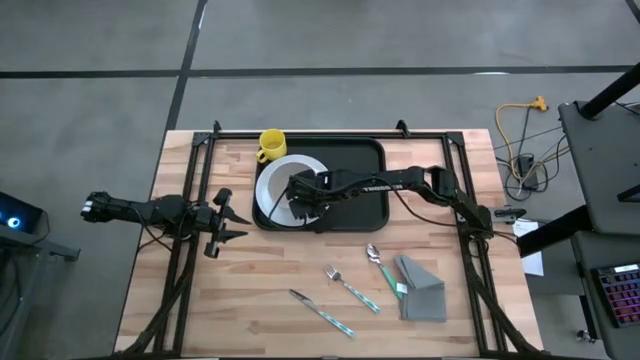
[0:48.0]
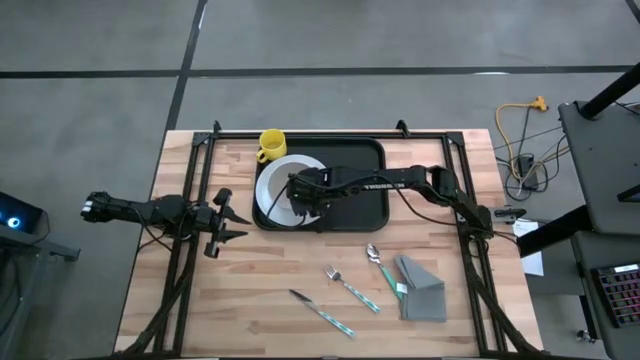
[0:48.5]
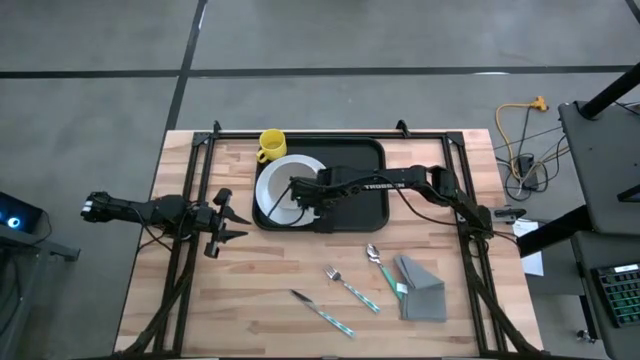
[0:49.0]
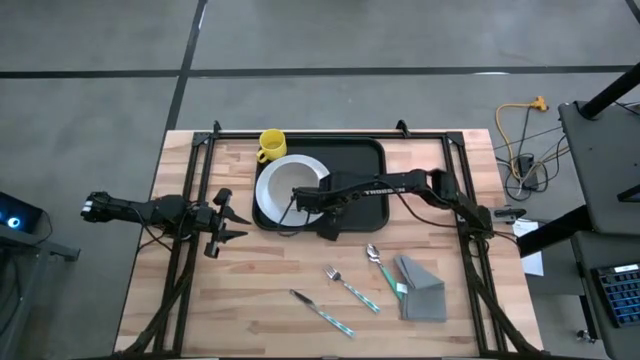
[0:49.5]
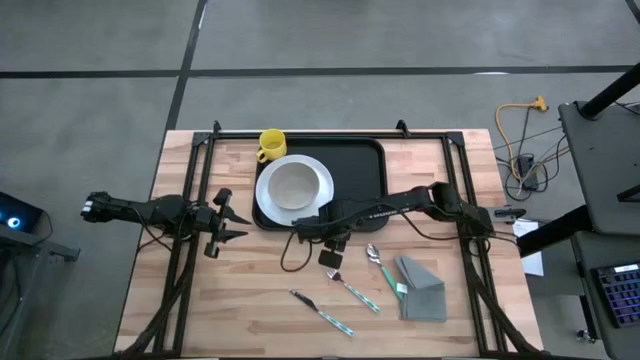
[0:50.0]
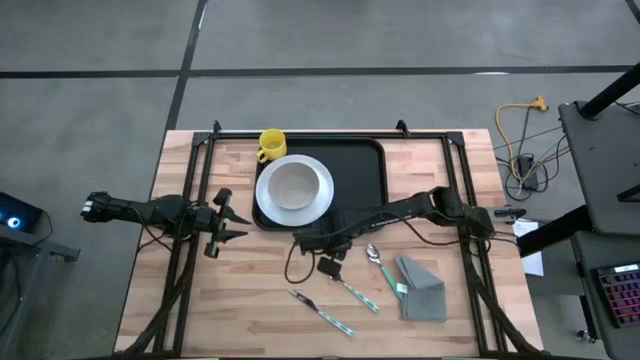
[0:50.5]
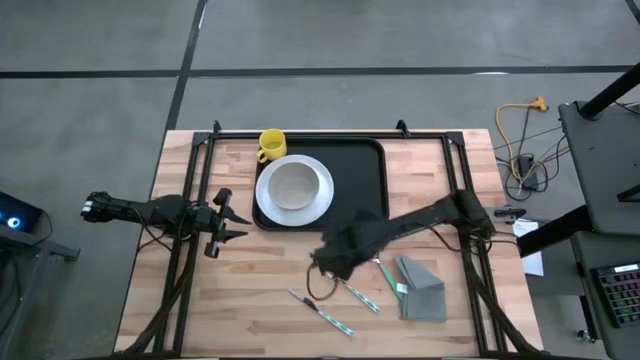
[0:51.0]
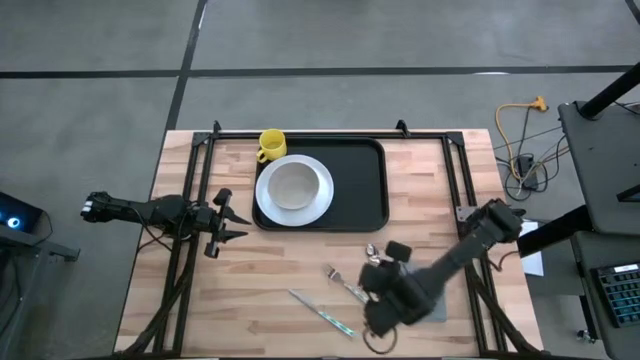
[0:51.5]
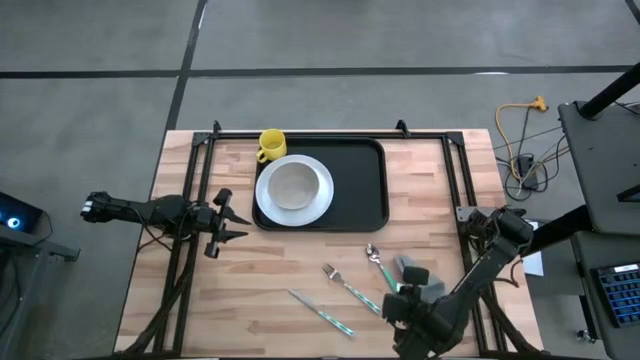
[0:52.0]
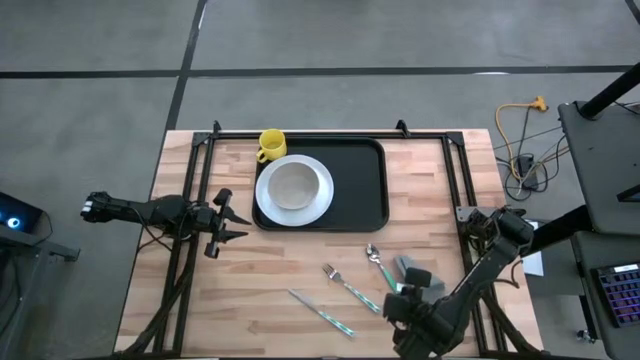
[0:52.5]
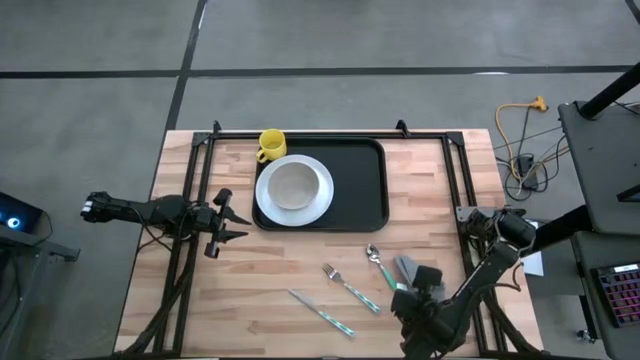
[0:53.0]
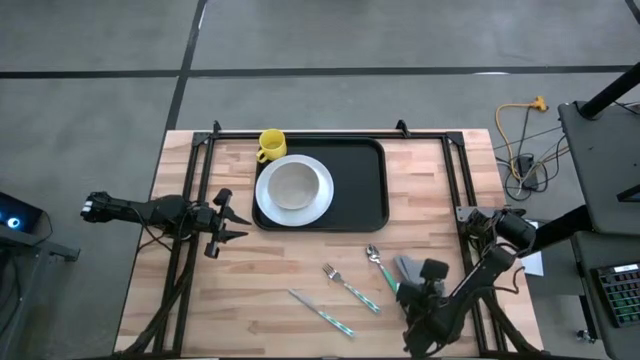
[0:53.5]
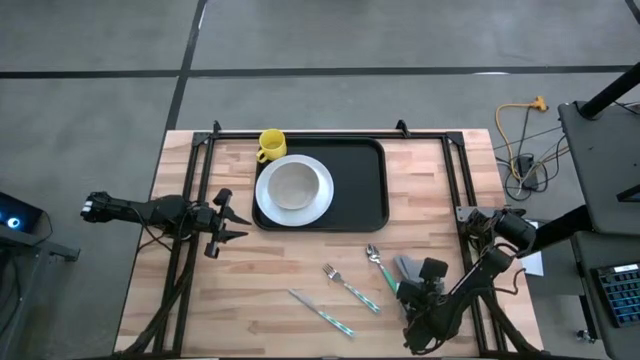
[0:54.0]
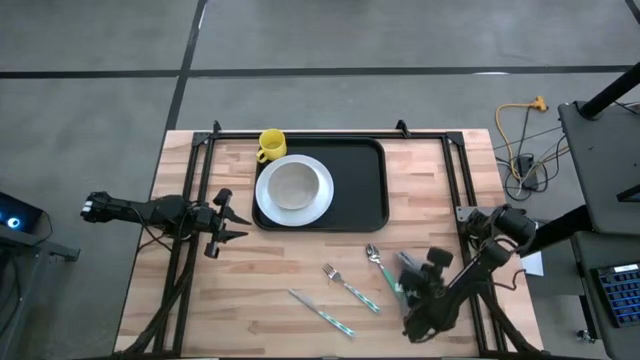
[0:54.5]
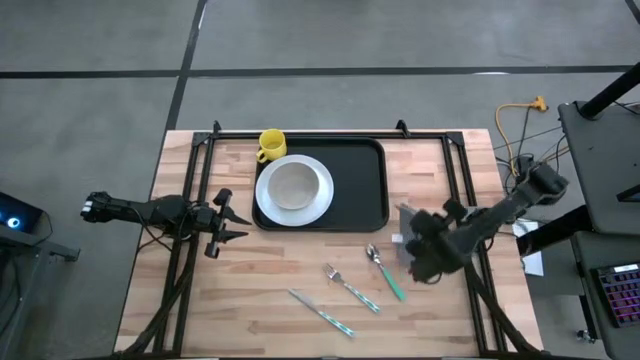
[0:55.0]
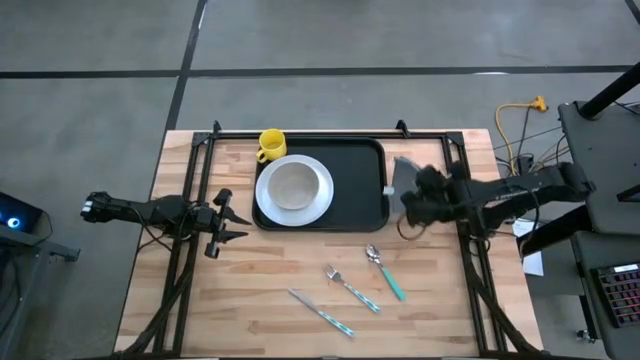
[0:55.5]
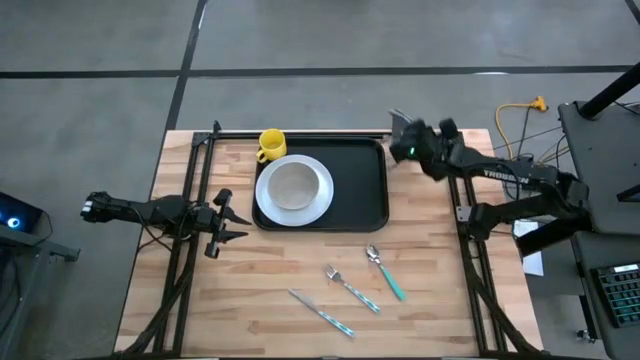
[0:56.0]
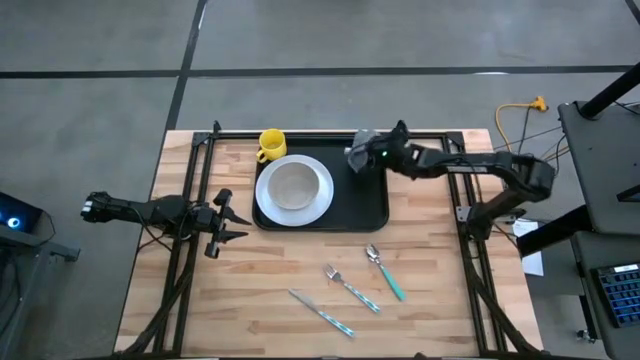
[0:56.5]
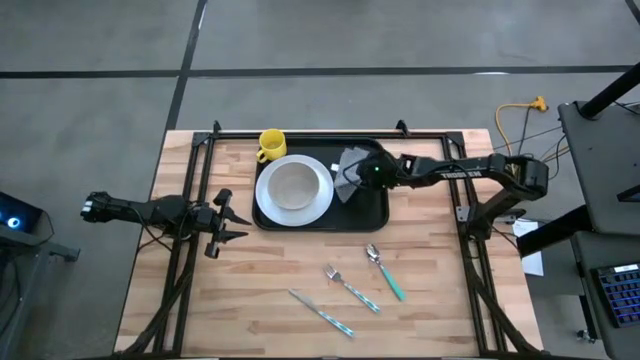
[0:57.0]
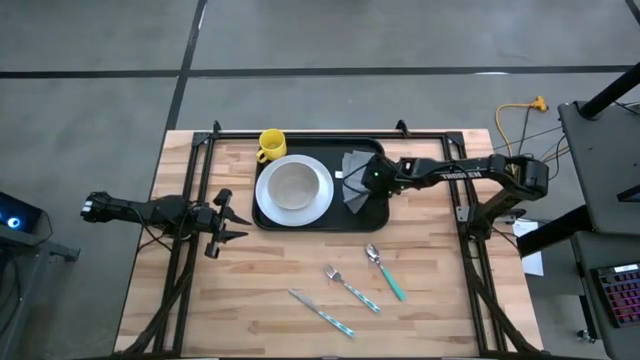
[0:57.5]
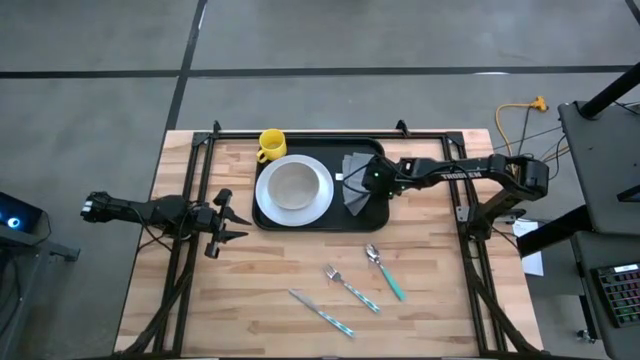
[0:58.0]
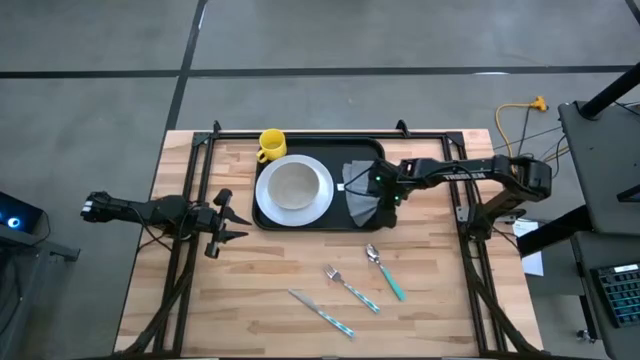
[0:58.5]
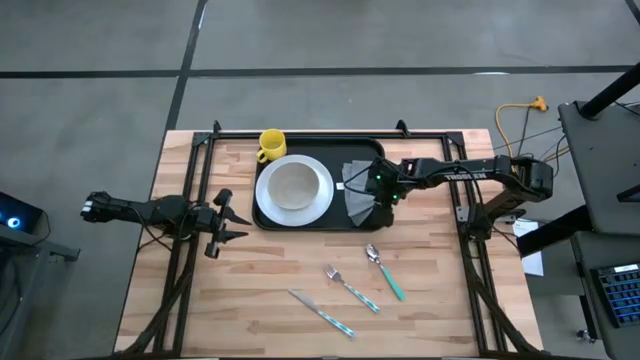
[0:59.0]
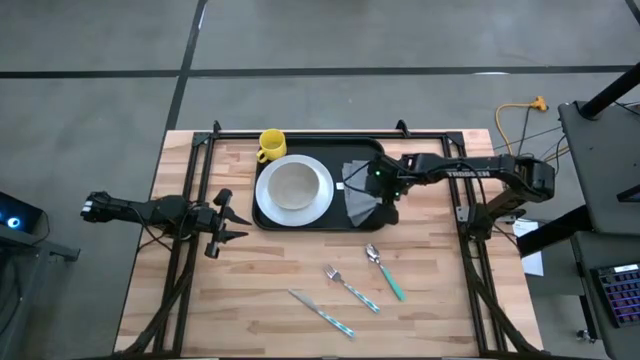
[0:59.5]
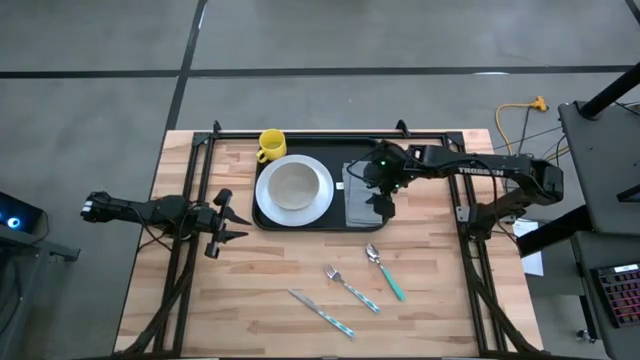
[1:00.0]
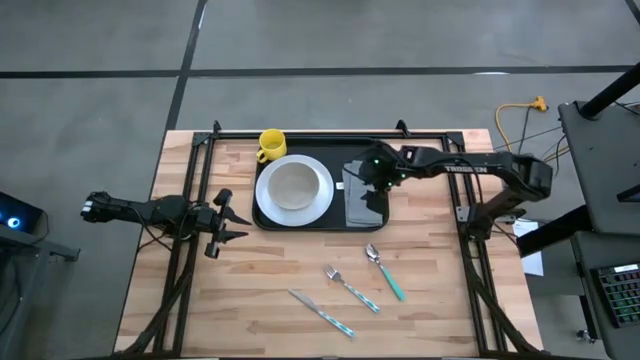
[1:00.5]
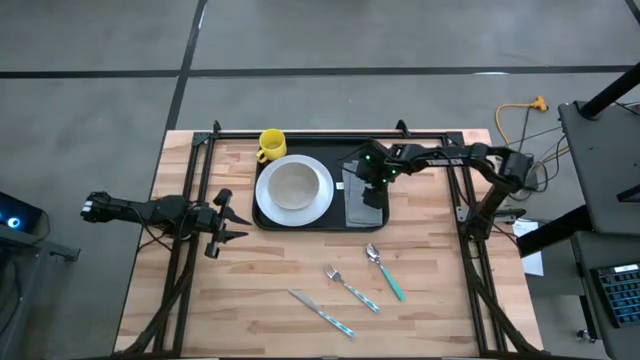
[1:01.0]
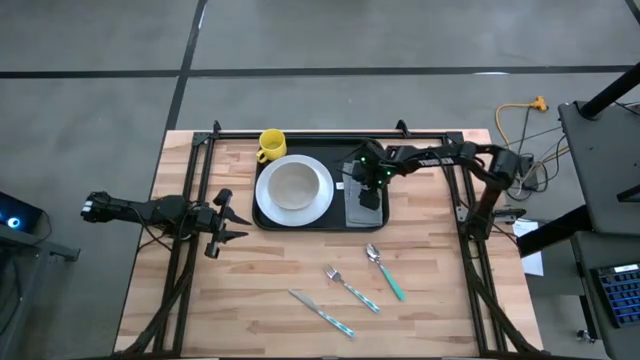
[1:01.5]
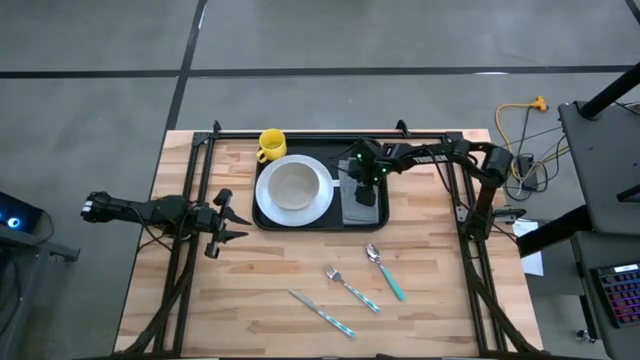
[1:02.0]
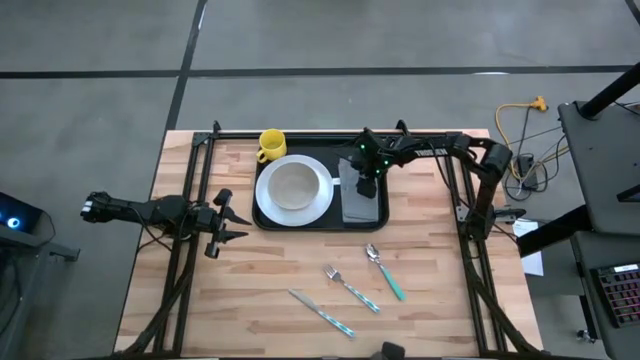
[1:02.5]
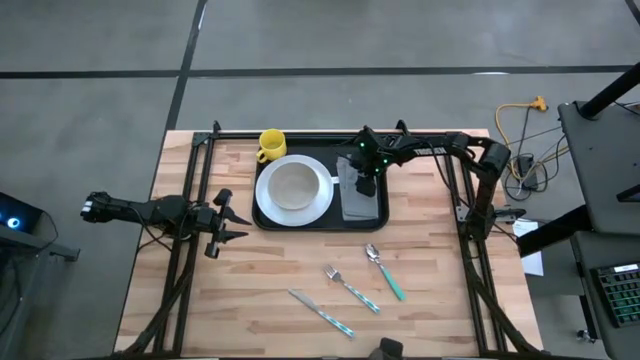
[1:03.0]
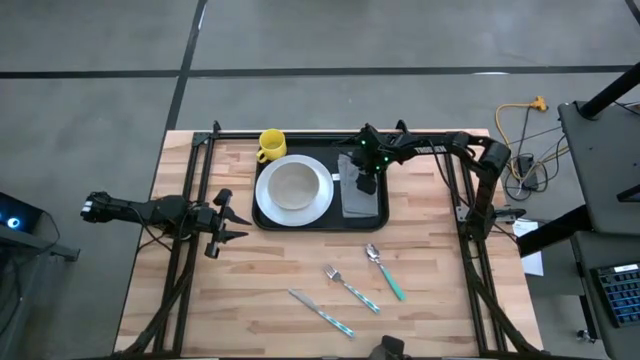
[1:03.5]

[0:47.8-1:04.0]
Task: Set up tray
Put the gray napkin on the black serving tray beside the white plate

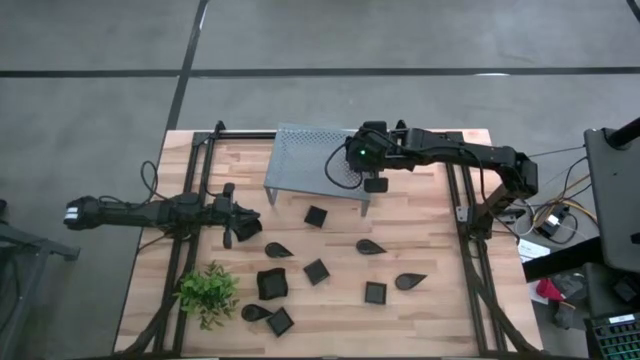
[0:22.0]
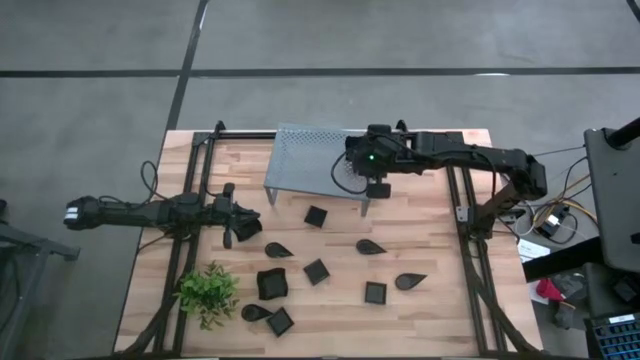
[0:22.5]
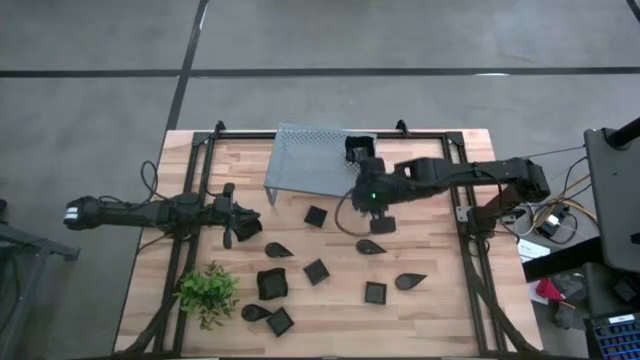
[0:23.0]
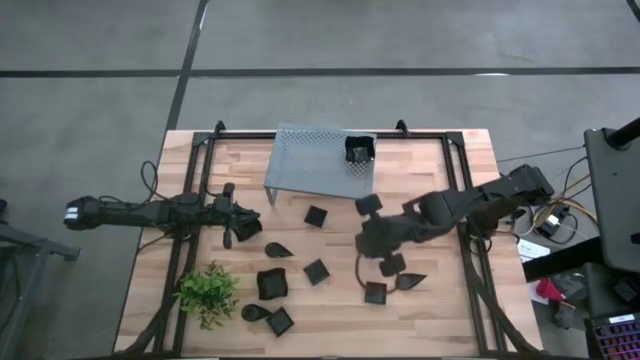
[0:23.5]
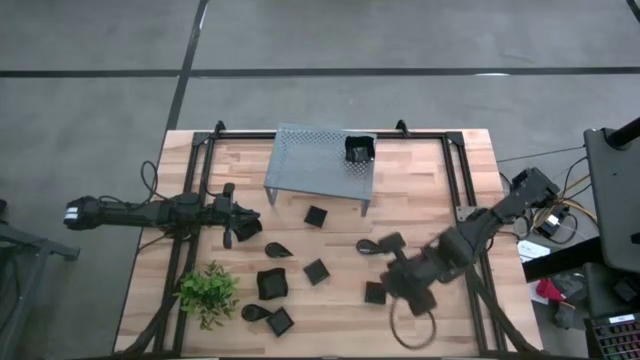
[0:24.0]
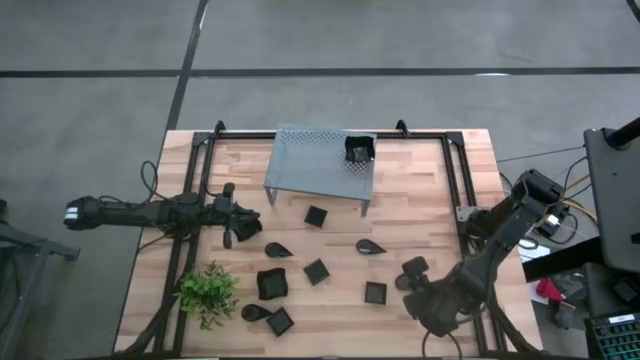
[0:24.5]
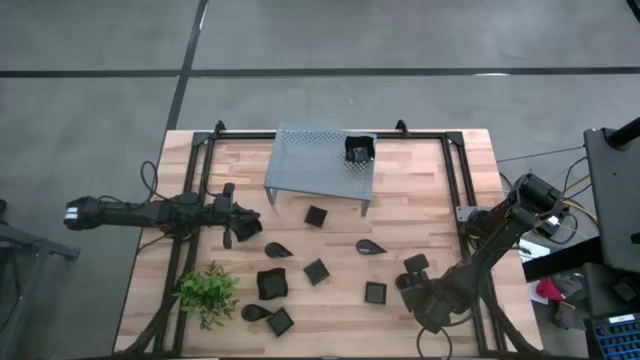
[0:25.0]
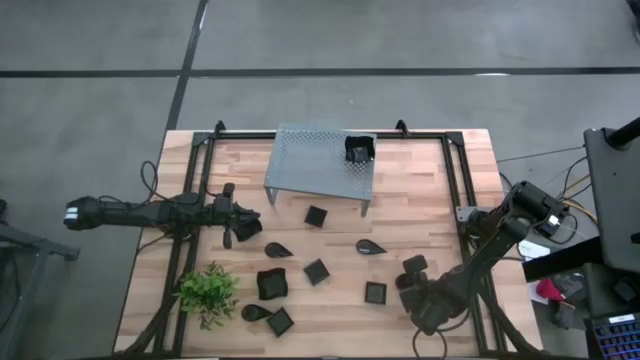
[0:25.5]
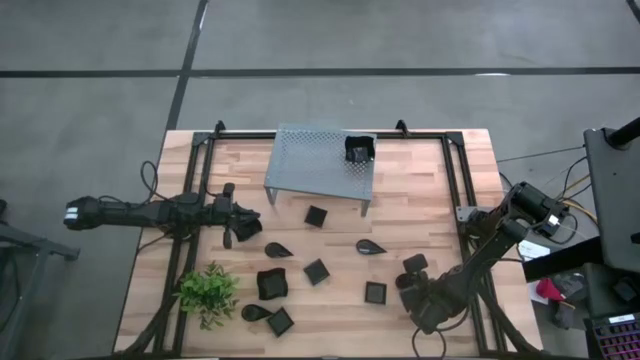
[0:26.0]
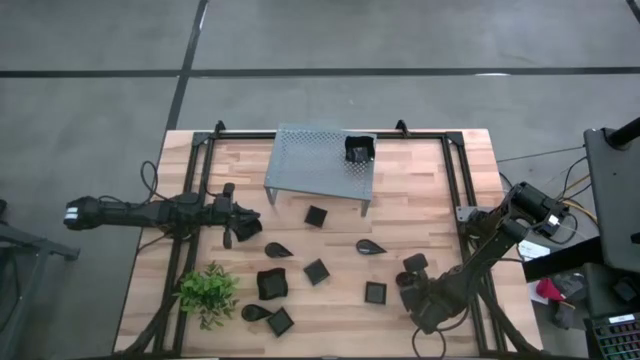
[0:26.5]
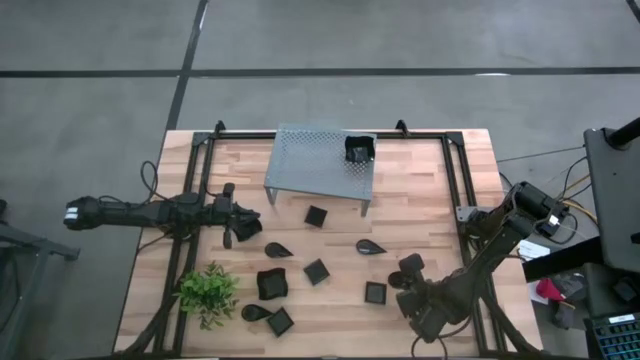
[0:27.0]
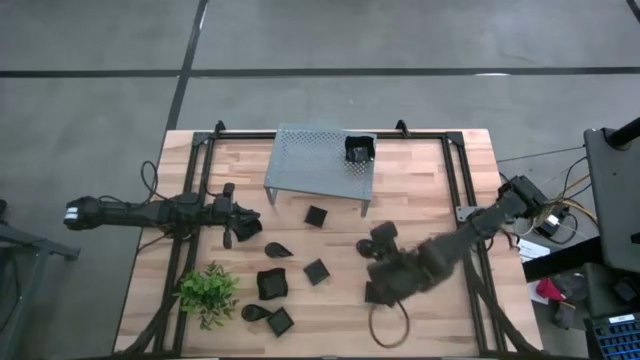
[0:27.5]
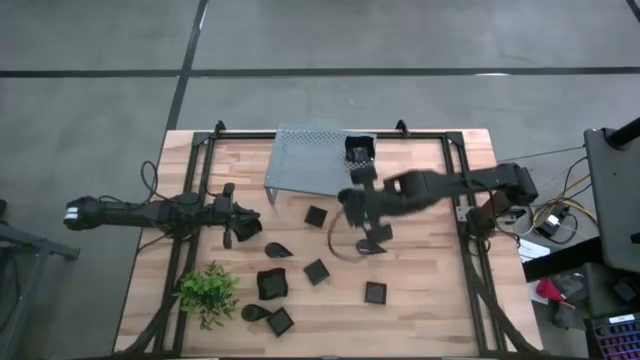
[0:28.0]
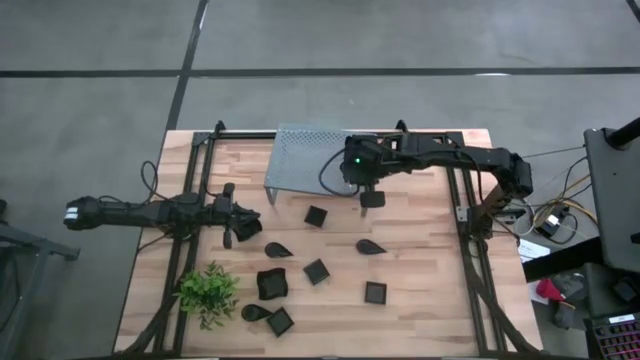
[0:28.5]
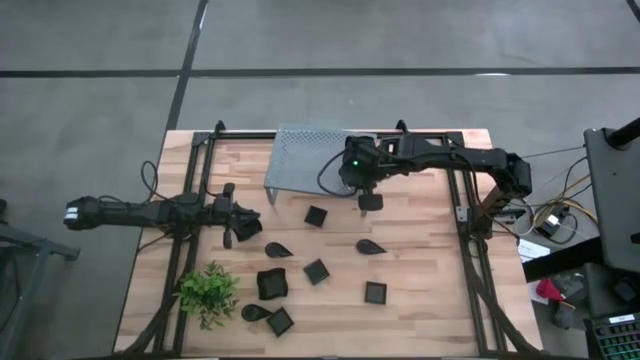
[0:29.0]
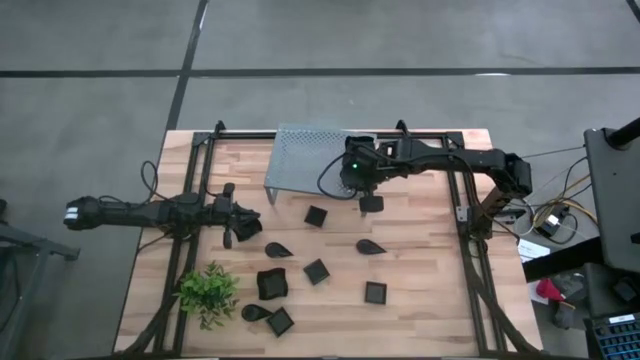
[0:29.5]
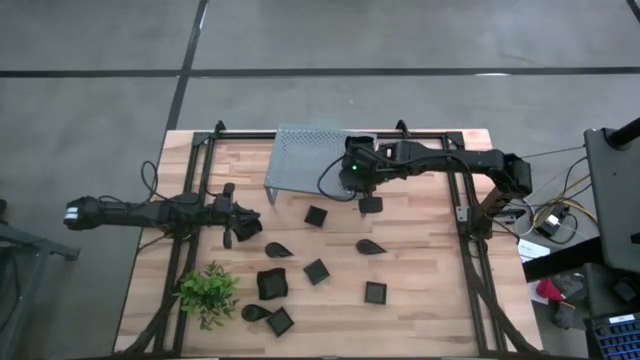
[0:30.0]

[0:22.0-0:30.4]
Task: Pick & Place Mini shaped plates
Put the black drop shaped plate on the shelf
